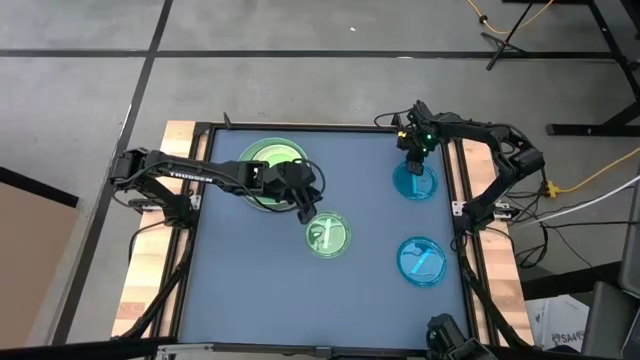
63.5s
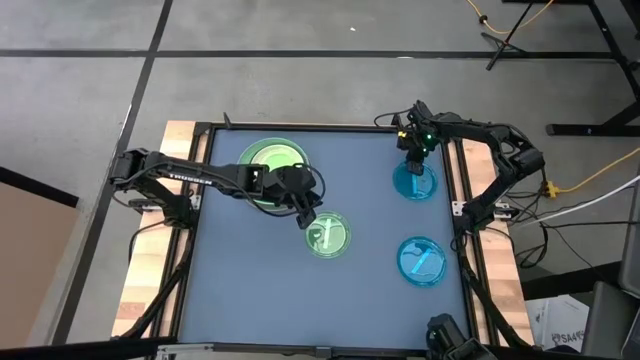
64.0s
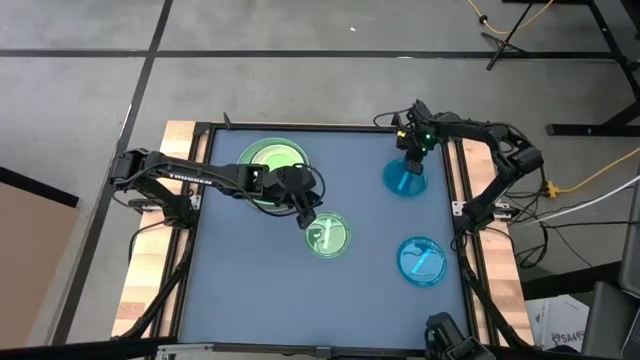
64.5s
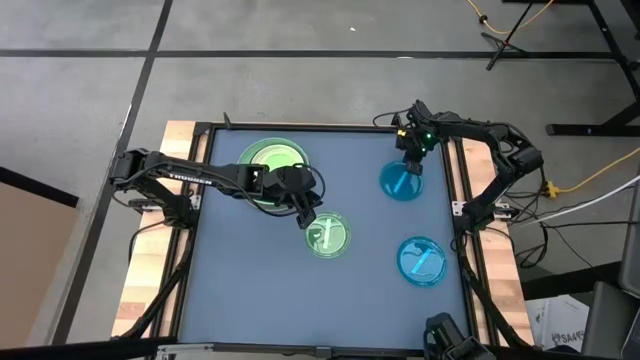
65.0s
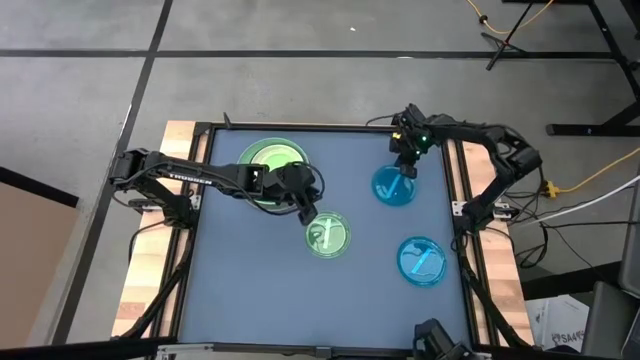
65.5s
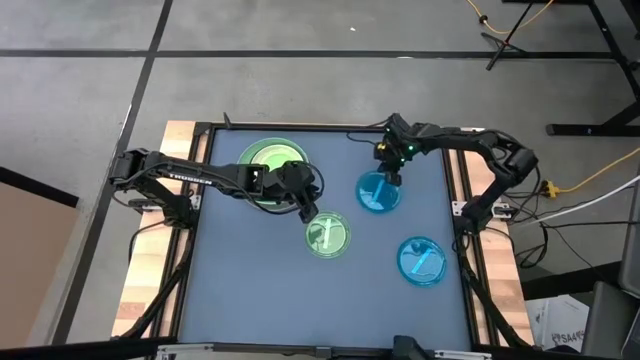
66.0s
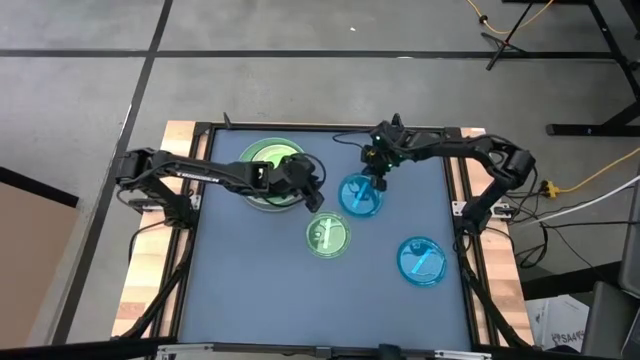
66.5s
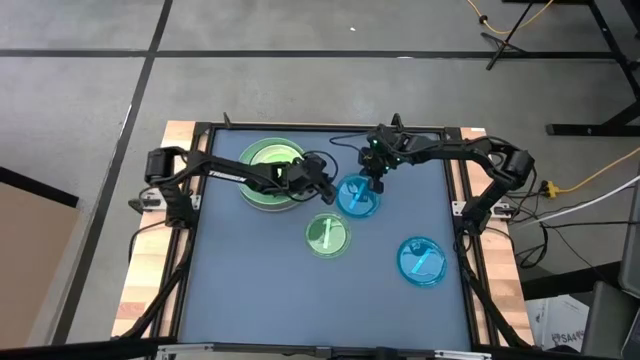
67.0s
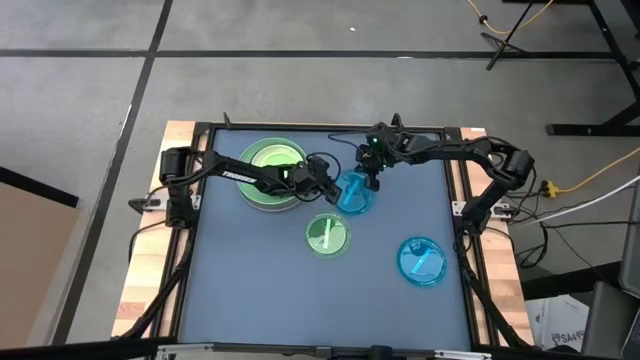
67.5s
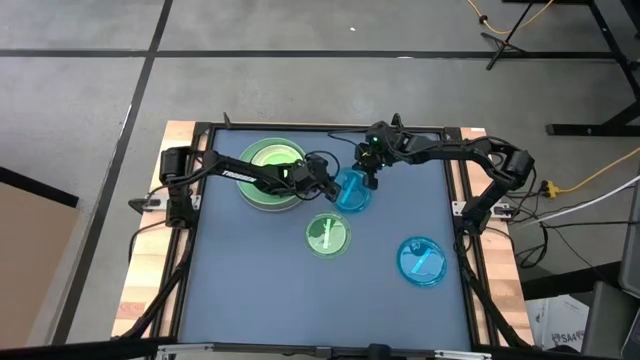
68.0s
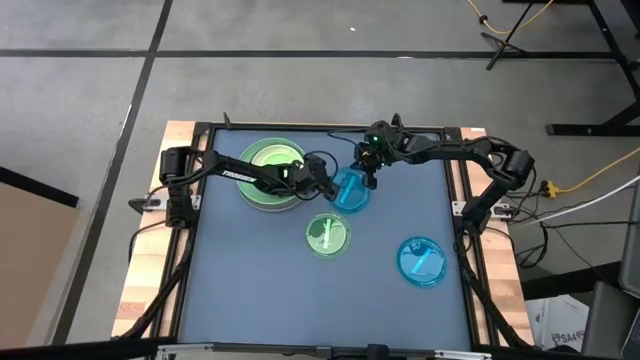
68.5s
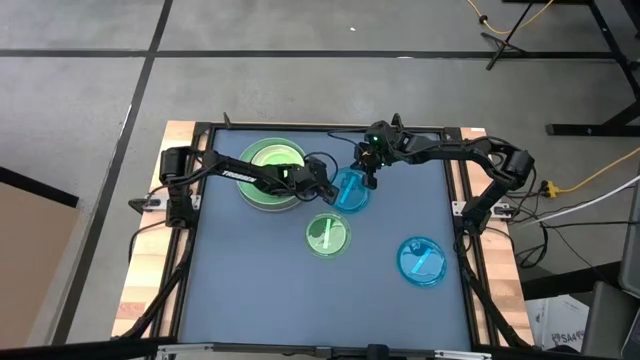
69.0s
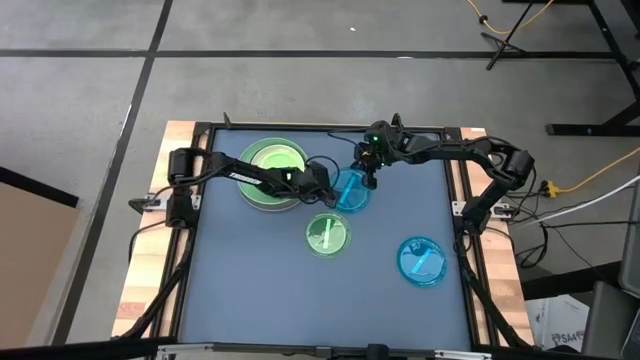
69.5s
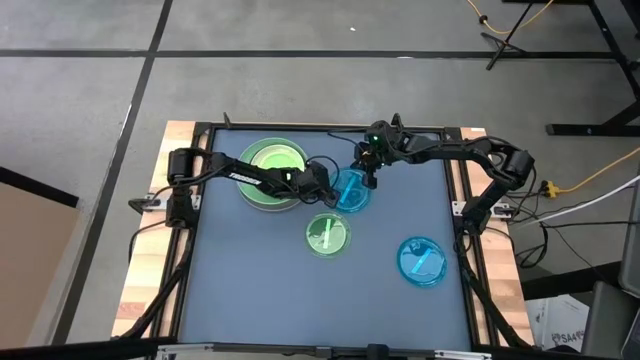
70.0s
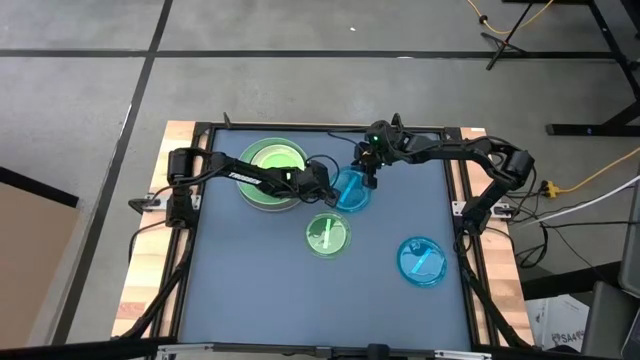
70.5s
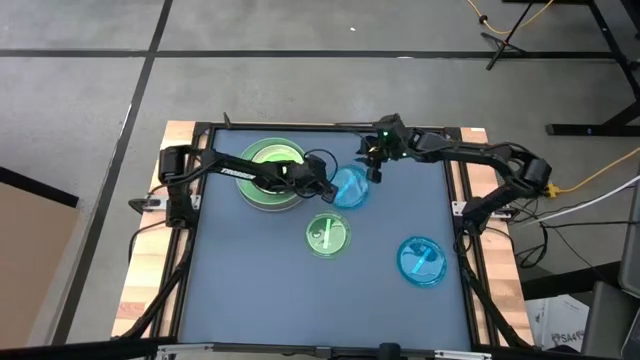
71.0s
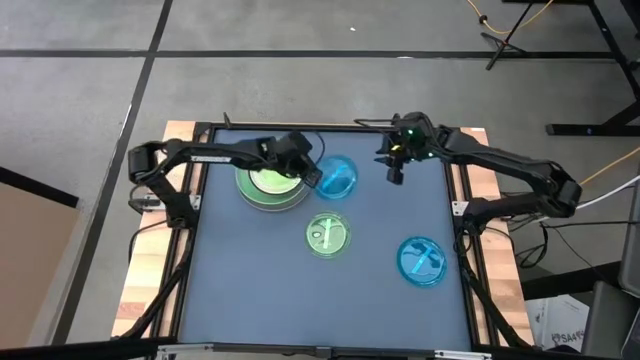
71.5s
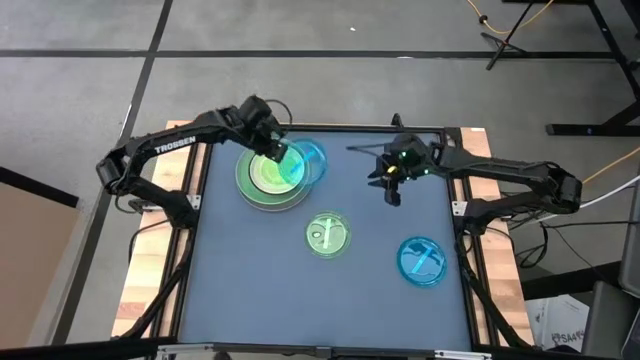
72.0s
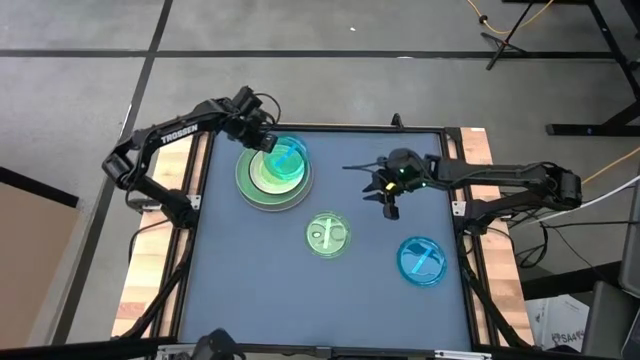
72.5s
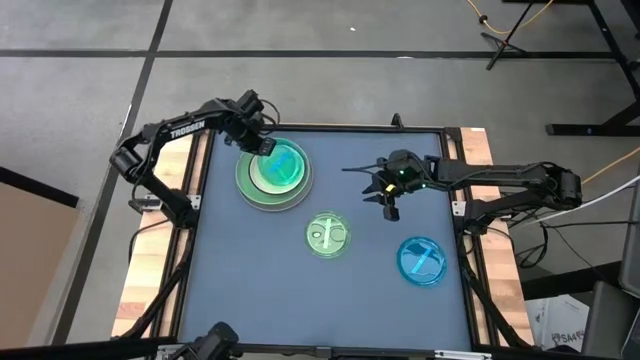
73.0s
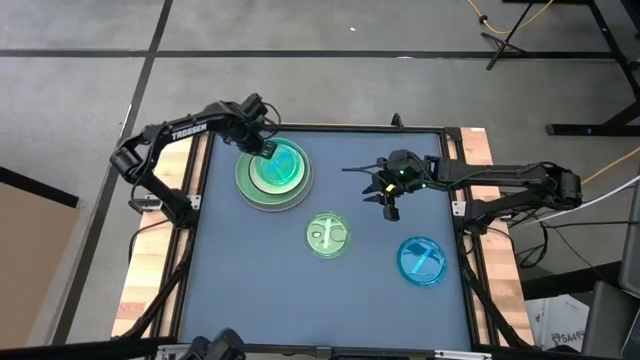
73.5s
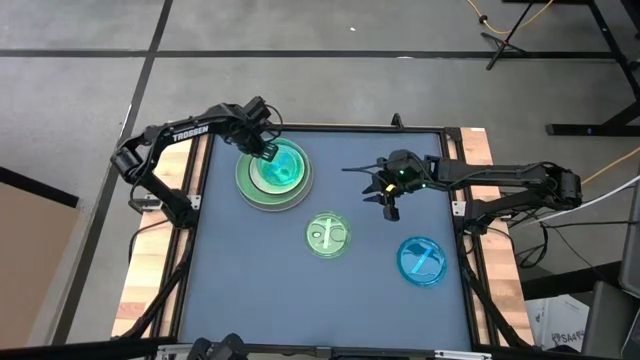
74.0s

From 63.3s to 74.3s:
Task: Stack plastic plates
Stack the top blue plate on top of the light green plate

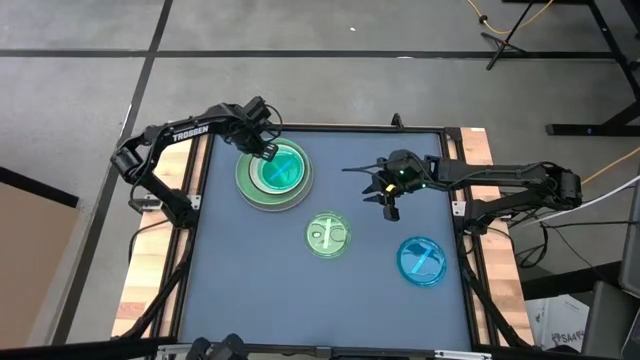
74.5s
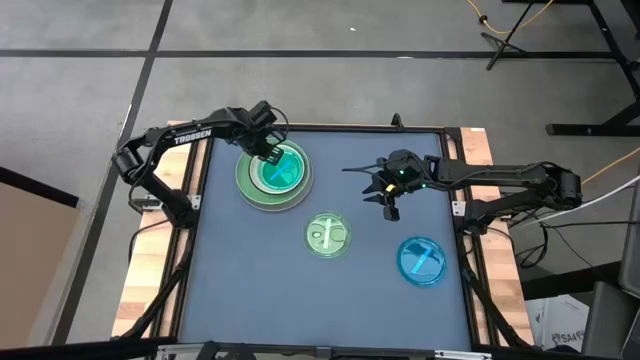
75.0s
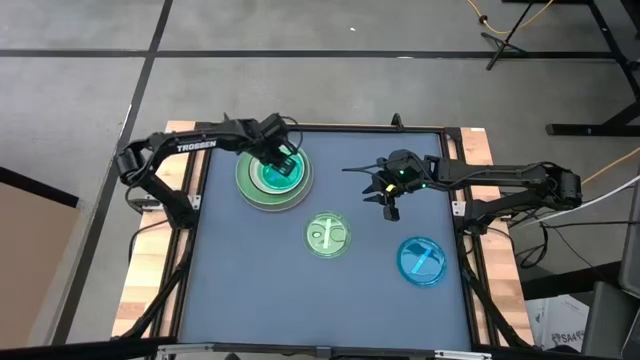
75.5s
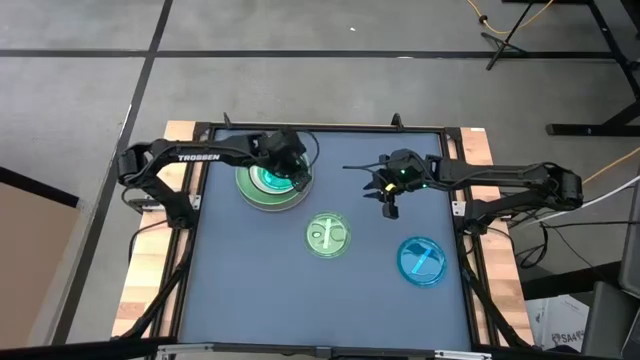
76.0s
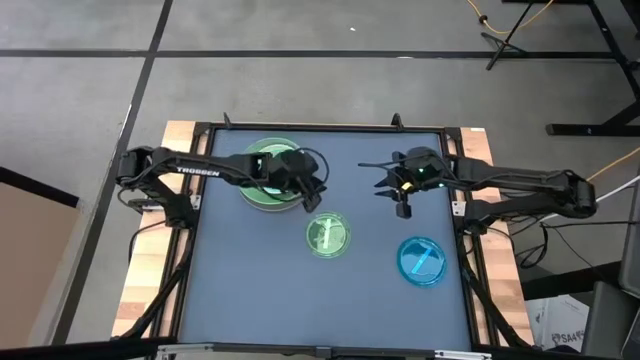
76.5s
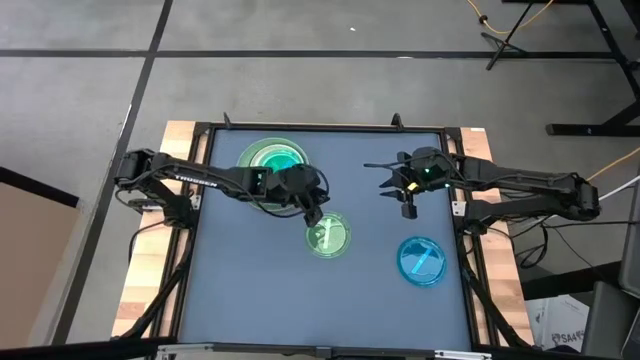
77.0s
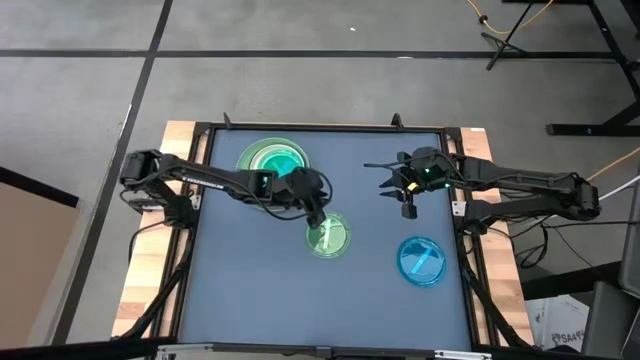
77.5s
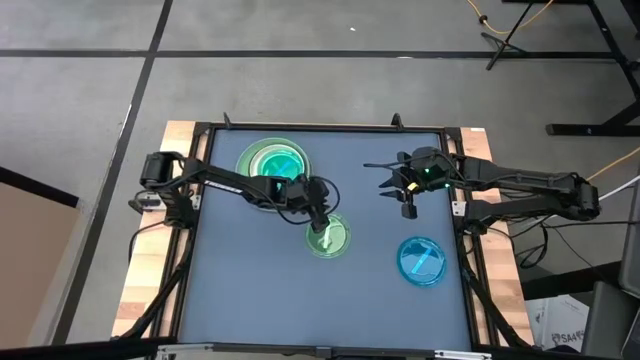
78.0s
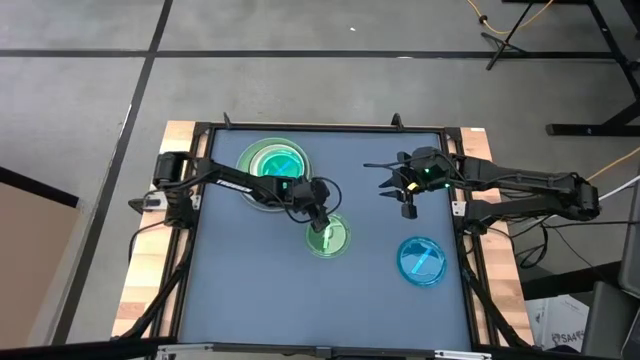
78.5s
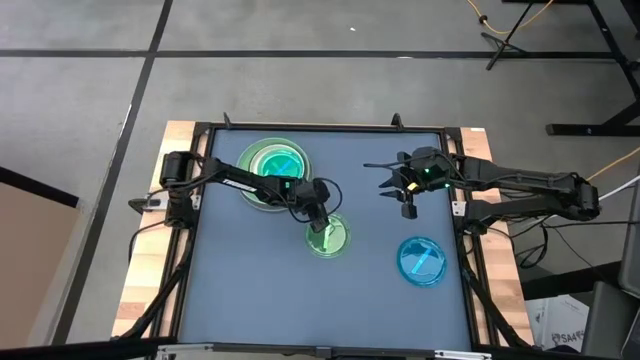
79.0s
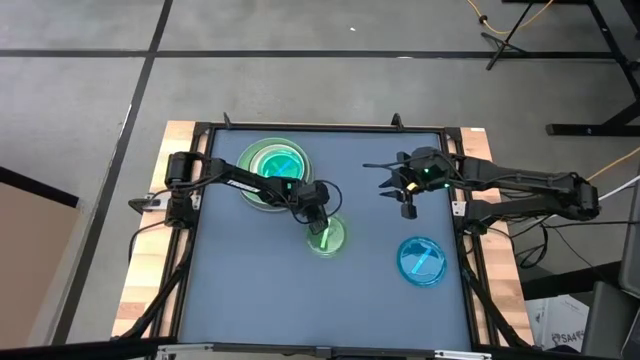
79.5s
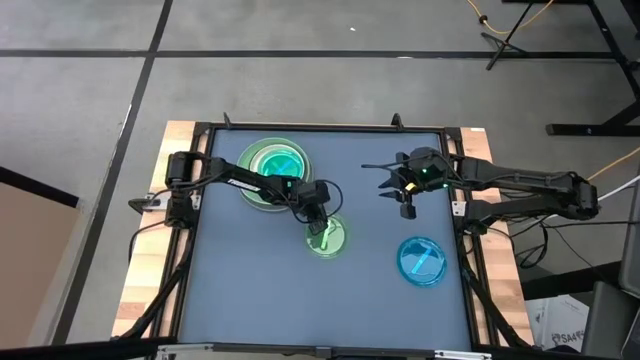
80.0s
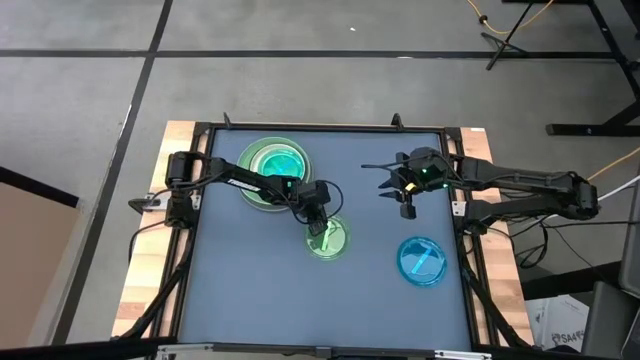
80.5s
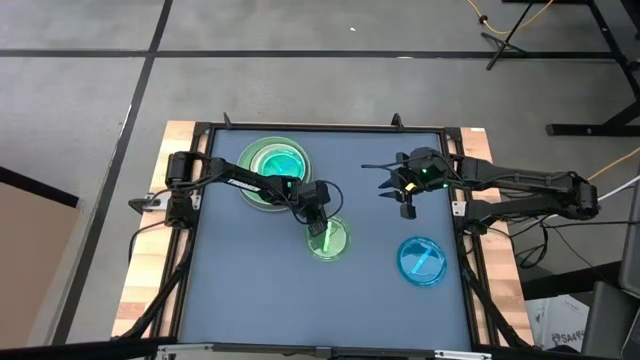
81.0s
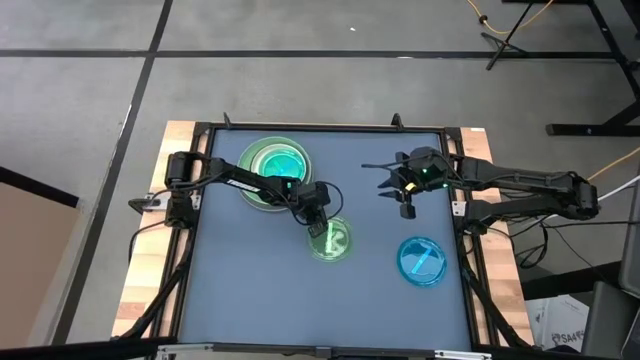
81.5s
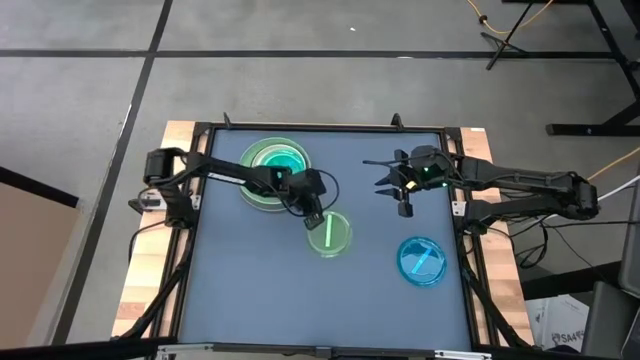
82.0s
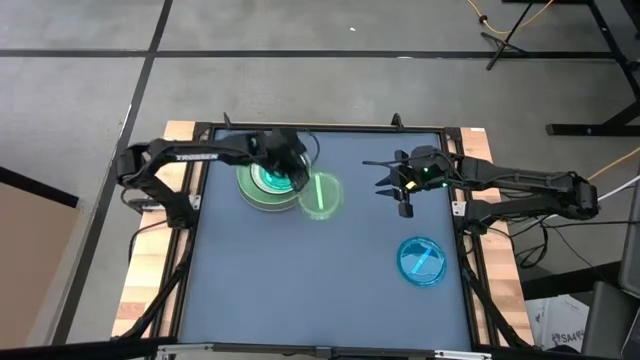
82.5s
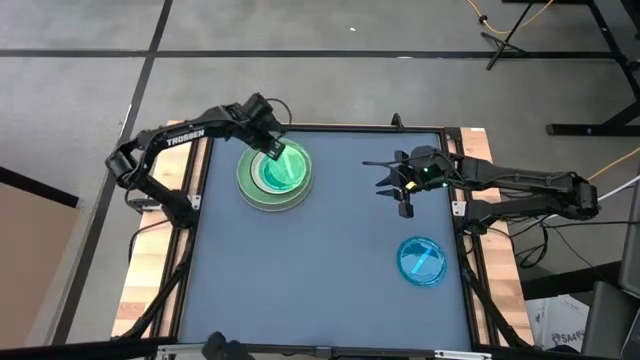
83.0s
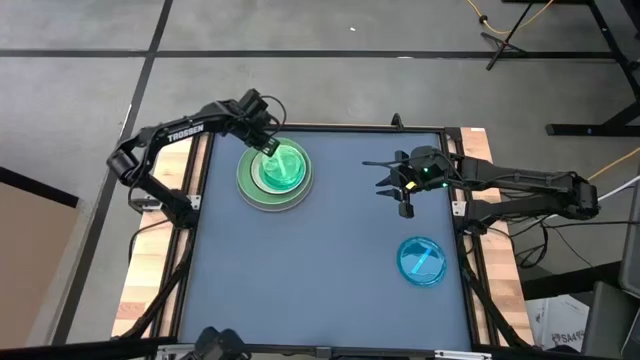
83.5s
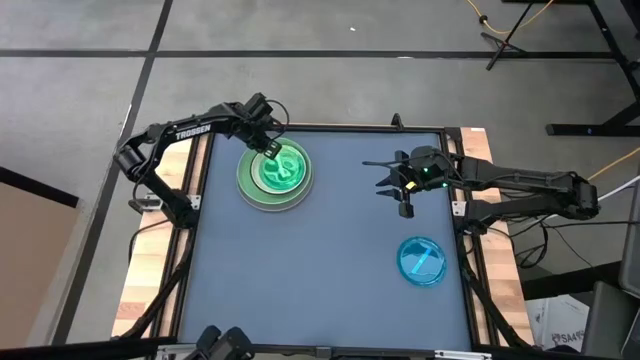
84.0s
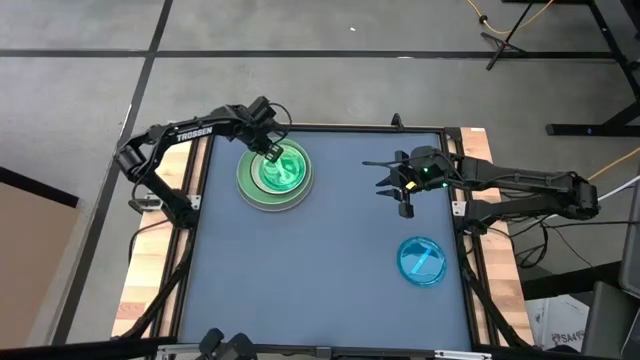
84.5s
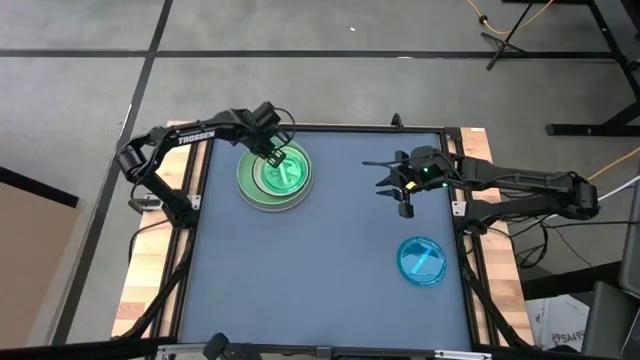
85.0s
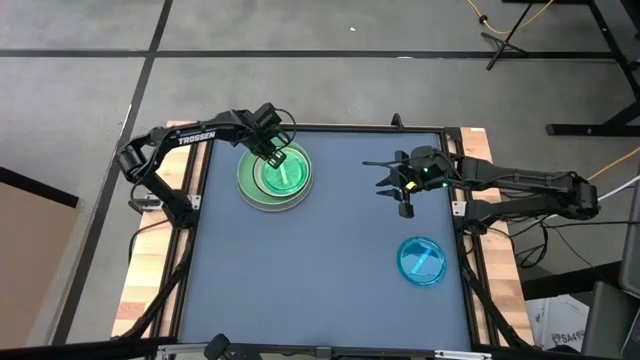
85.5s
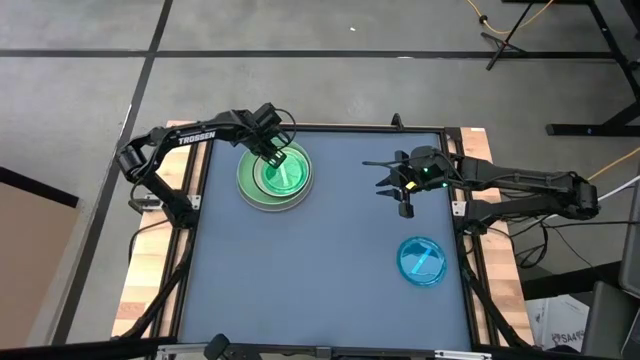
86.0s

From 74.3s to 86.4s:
Stack the light green plate on top of the blue plate
